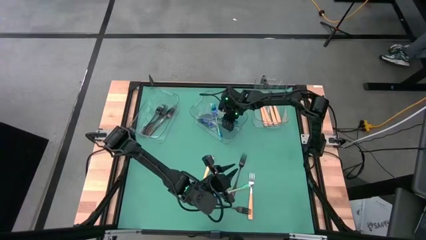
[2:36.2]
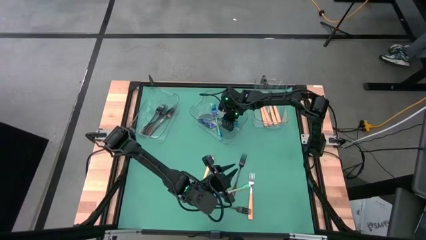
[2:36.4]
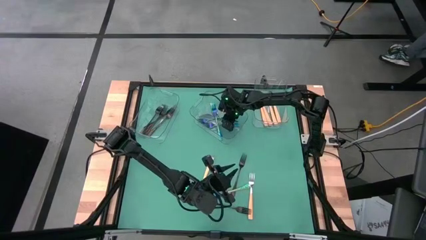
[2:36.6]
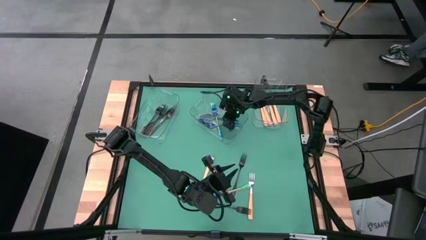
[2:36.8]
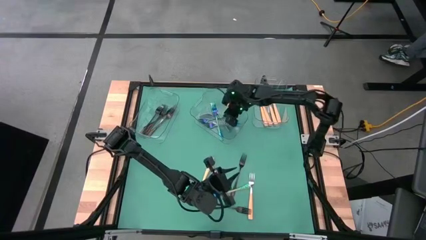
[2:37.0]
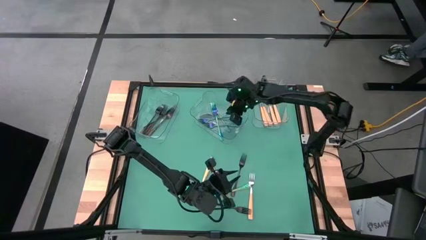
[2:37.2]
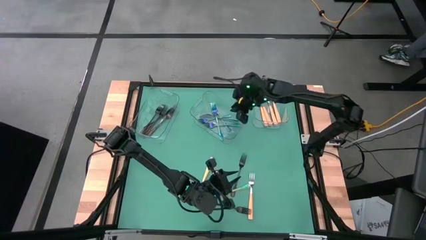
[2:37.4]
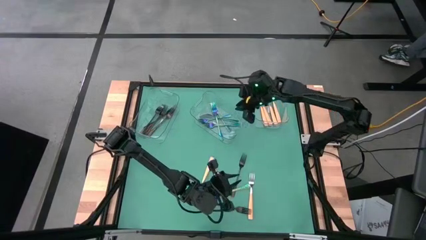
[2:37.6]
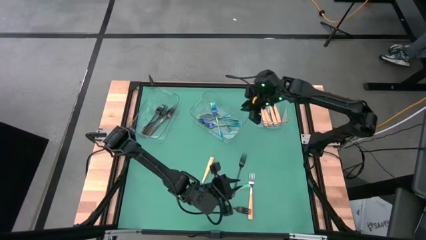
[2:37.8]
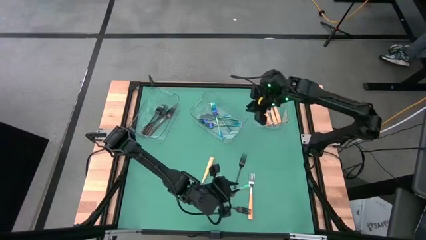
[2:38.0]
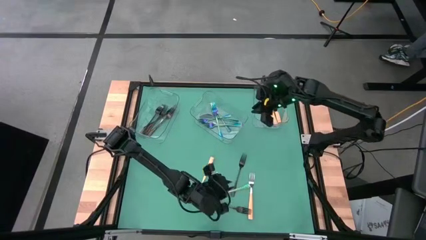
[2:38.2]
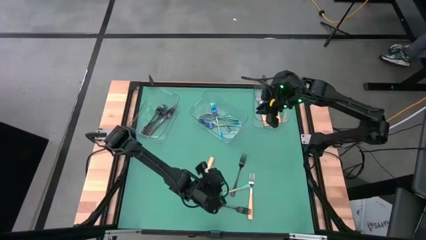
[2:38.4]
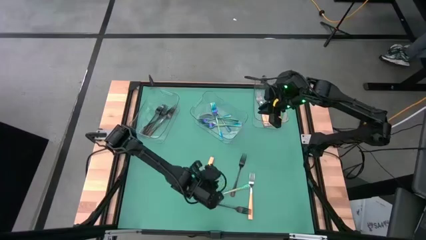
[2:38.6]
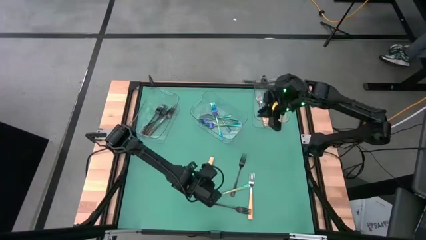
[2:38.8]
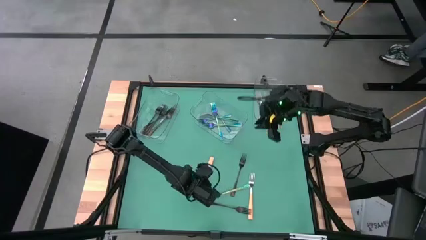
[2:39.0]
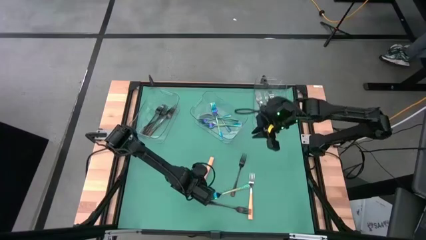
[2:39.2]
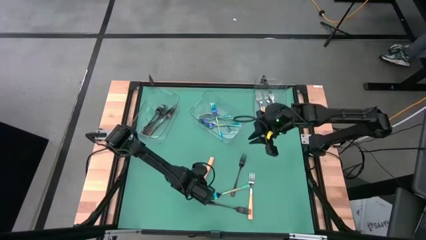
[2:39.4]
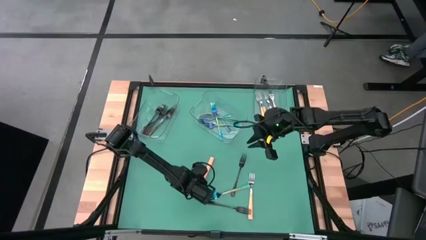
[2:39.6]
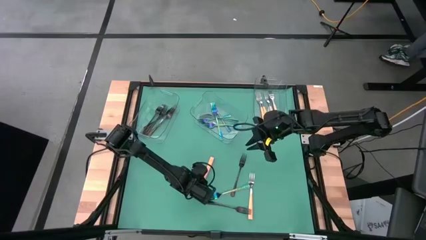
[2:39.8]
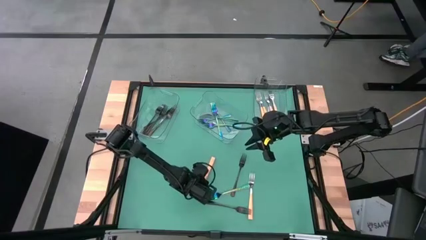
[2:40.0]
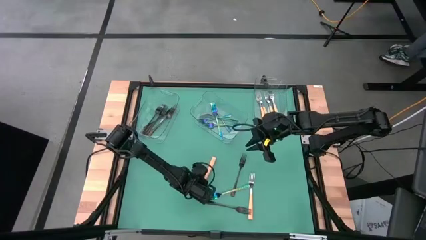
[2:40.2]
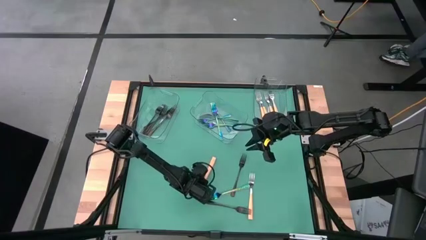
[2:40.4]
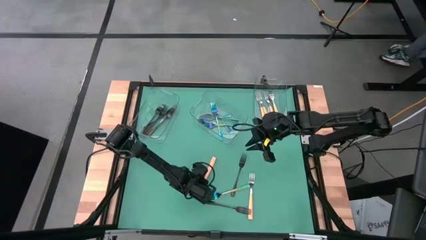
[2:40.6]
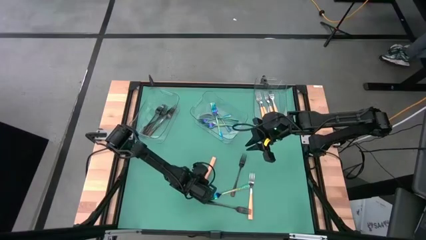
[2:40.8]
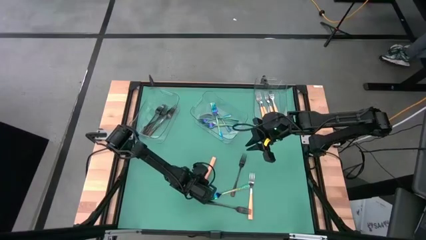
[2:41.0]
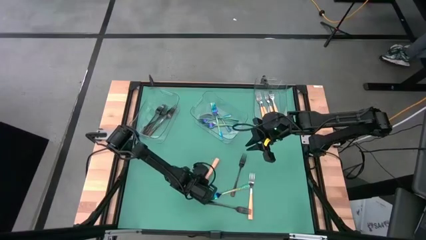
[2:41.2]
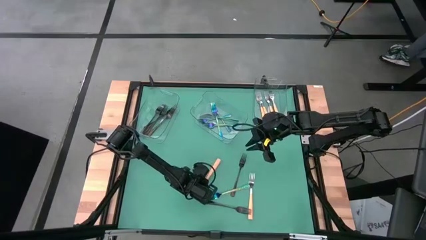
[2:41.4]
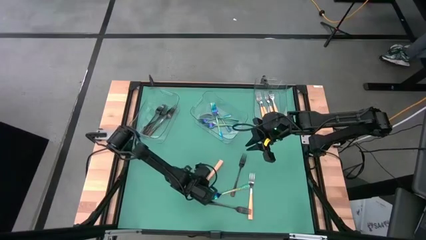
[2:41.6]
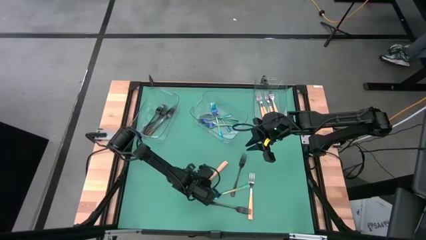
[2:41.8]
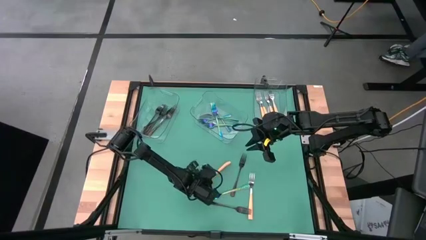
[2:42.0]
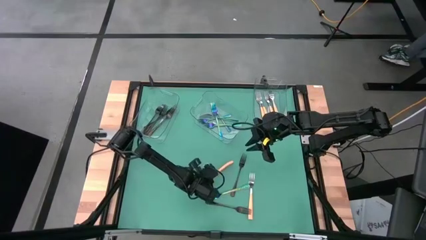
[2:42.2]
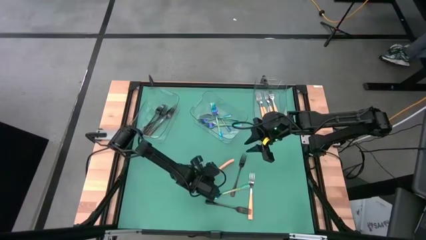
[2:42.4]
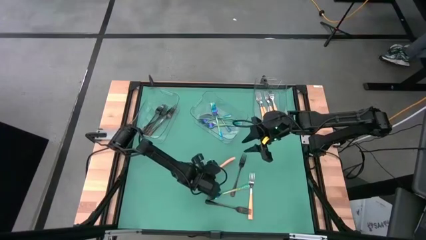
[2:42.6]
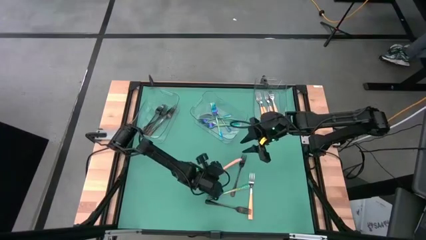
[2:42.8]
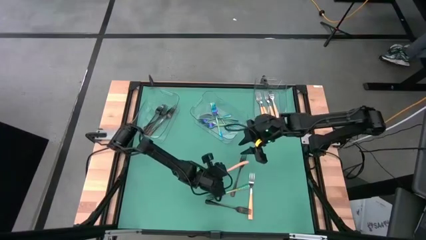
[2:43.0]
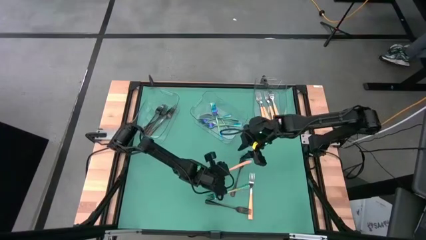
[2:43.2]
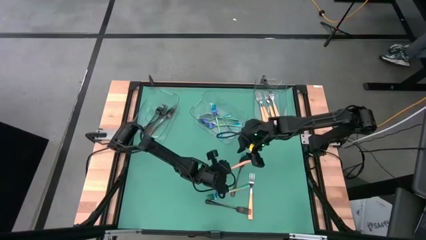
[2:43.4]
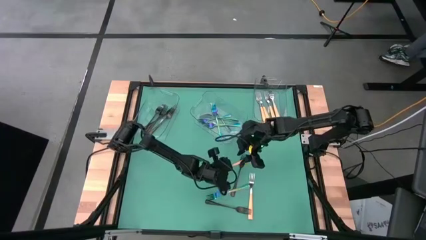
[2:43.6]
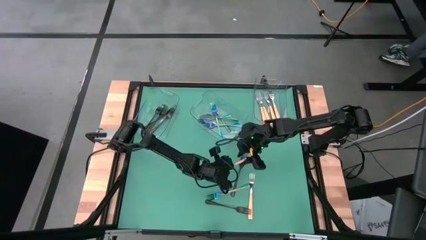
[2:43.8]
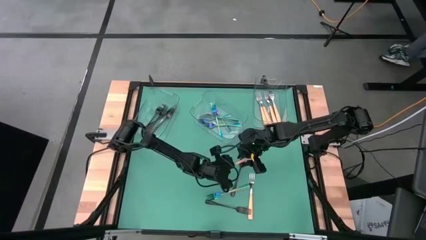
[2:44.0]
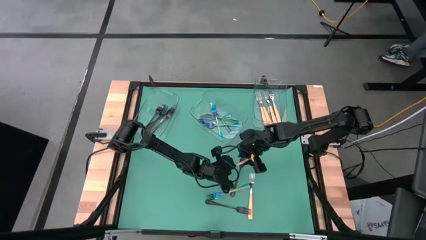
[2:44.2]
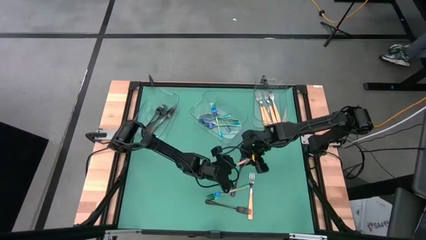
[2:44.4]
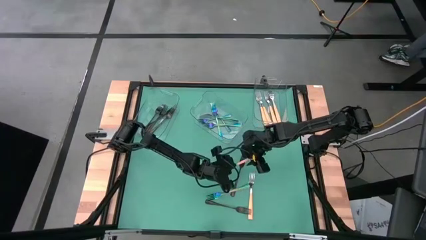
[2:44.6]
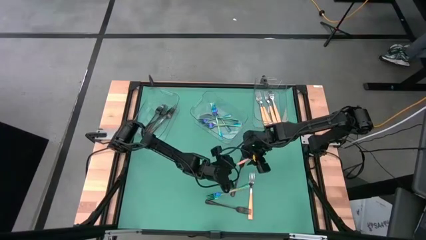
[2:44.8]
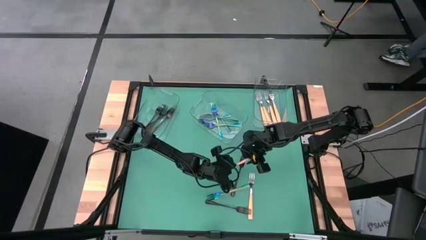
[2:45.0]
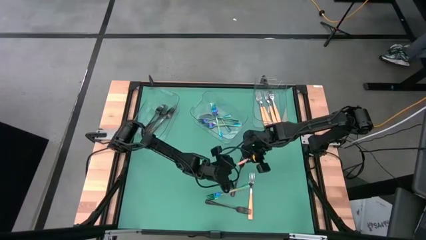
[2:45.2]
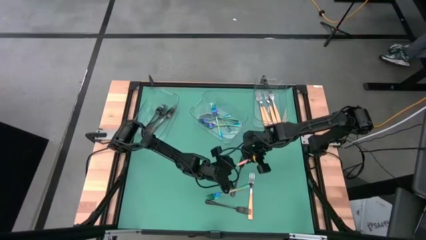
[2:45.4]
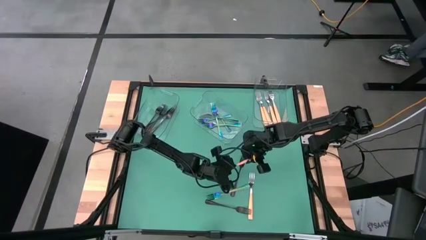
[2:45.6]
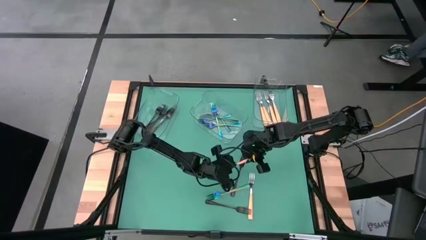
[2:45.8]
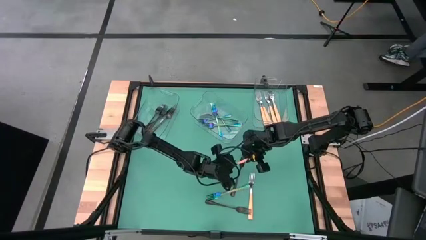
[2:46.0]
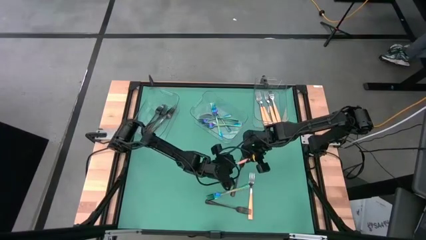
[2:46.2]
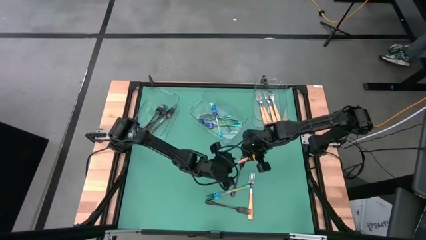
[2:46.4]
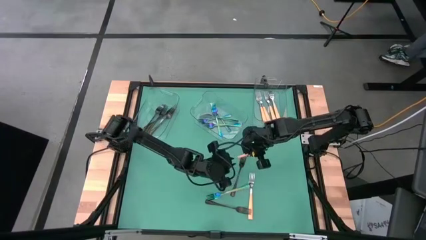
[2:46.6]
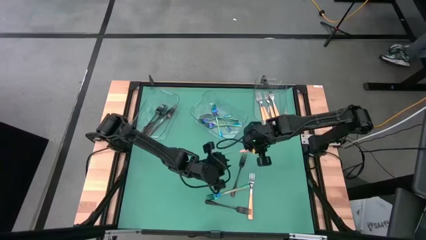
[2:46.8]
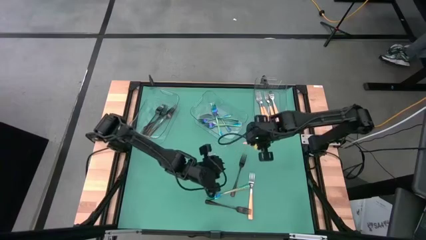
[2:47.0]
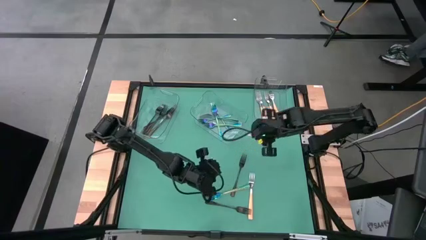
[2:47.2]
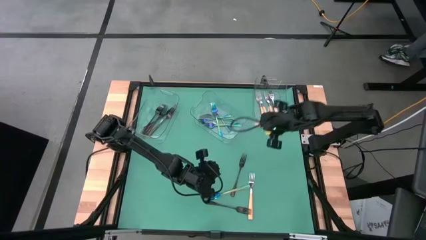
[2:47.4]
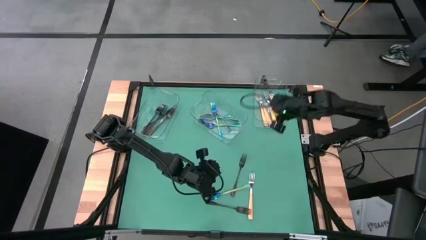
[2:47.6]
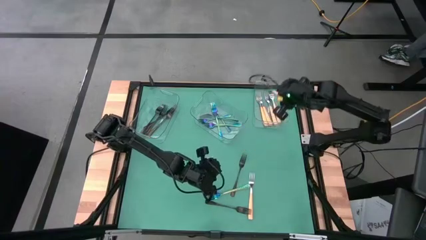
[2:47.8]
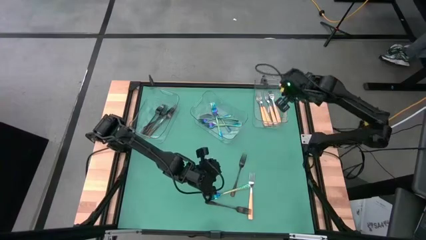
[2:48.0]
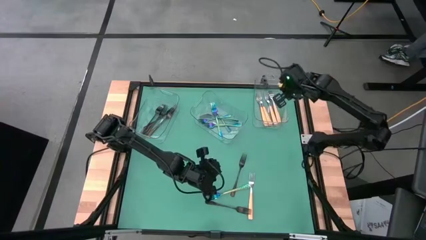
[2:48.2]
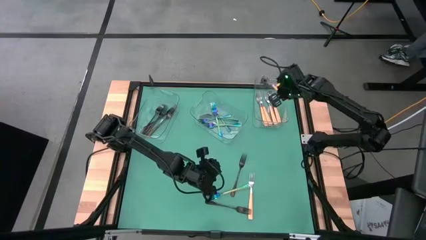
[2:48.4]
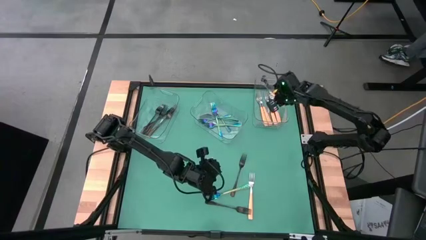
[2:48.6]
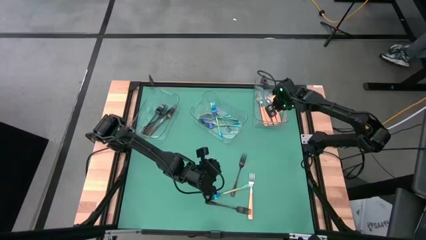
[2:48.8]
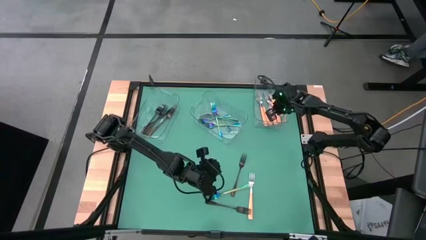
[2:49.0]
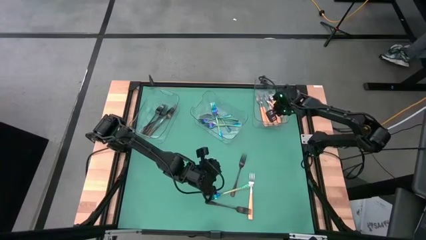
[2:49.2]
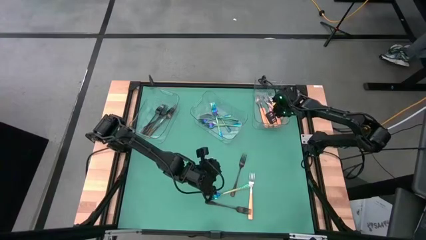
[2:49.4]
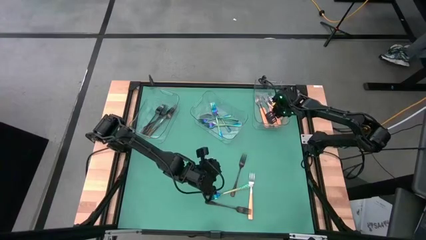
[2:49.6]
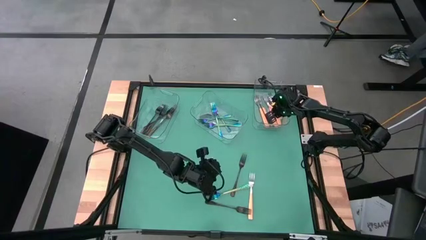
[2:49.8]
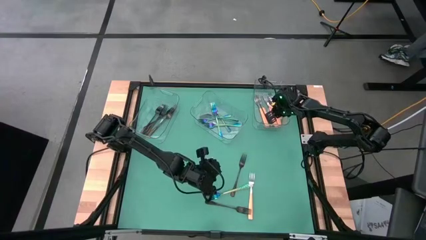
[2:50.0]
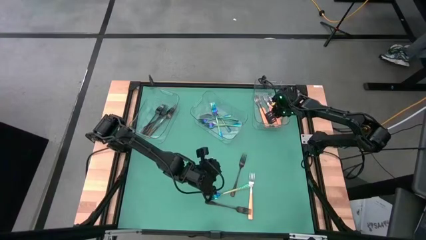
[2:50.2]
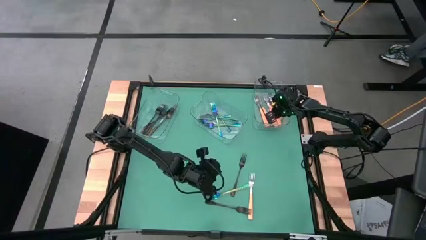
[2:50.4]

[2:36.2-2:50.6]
Task: Sort silverware by color (type)
Put the orange fork into the right transparent bin

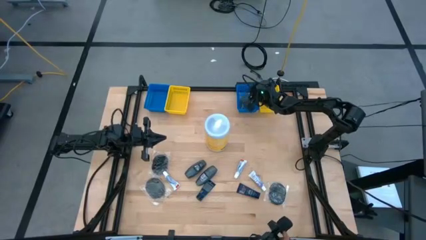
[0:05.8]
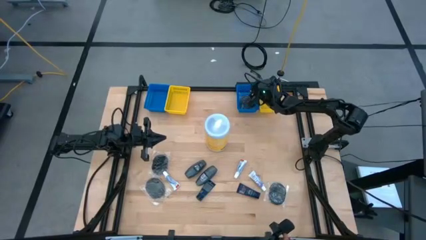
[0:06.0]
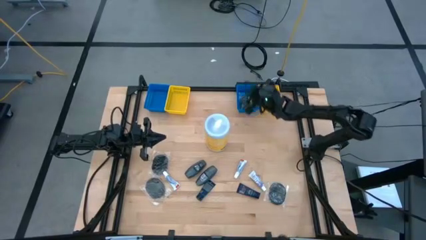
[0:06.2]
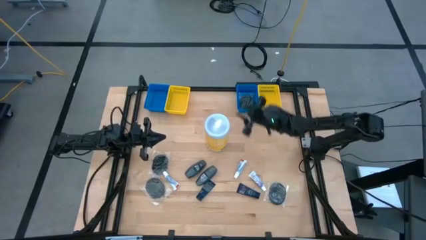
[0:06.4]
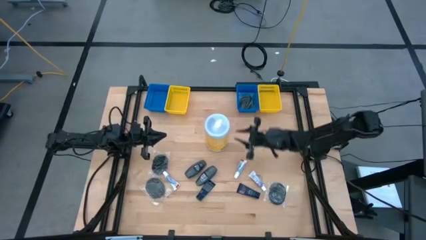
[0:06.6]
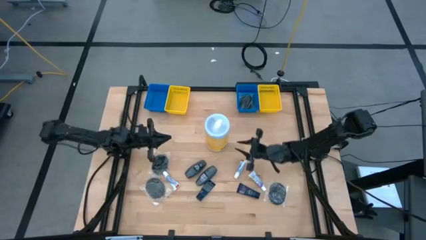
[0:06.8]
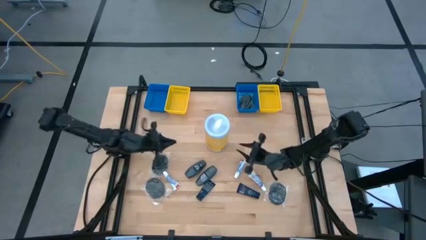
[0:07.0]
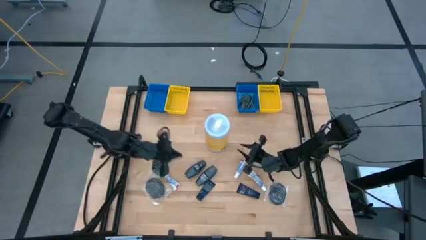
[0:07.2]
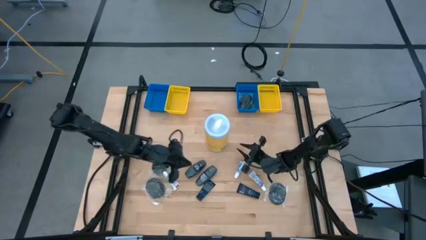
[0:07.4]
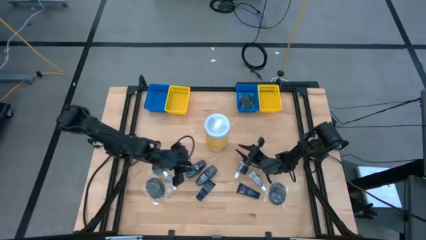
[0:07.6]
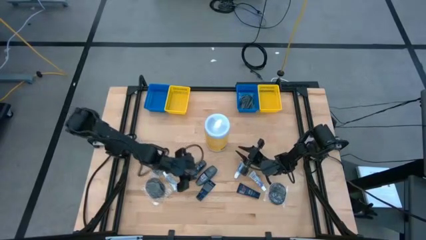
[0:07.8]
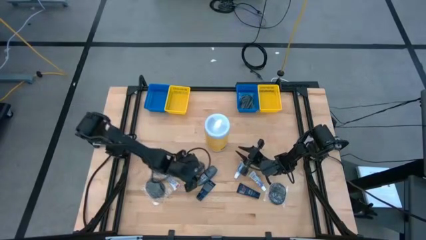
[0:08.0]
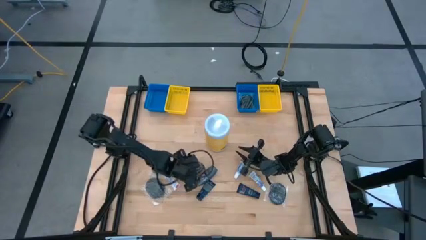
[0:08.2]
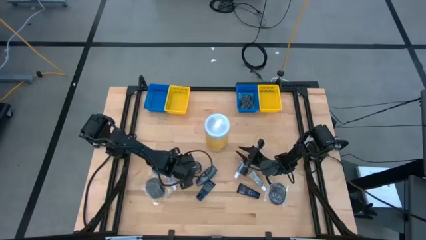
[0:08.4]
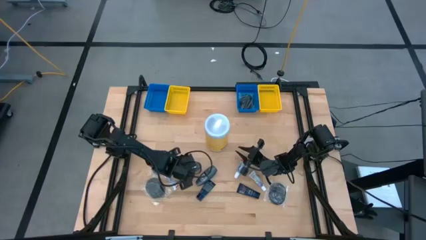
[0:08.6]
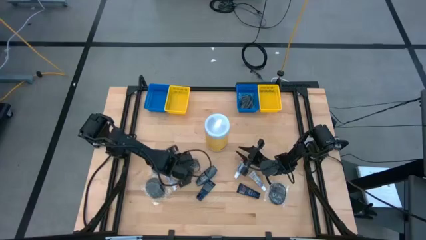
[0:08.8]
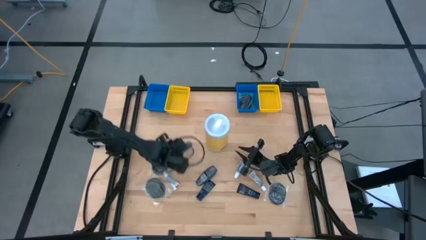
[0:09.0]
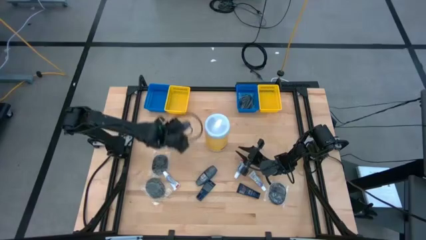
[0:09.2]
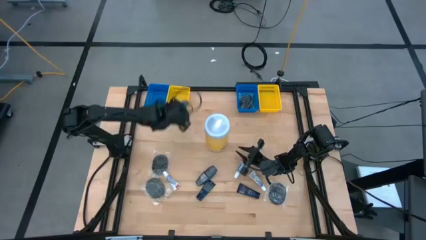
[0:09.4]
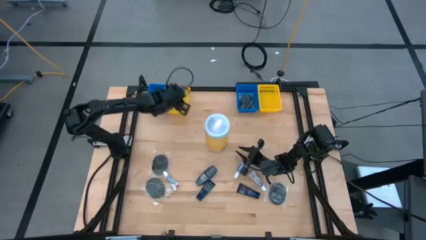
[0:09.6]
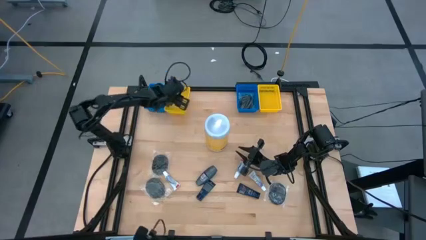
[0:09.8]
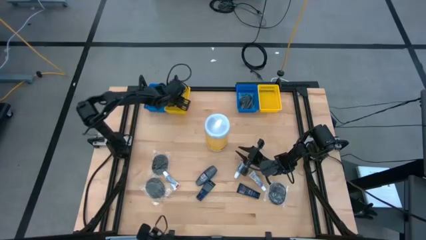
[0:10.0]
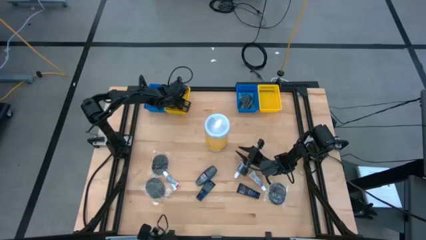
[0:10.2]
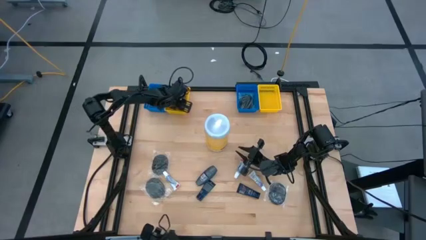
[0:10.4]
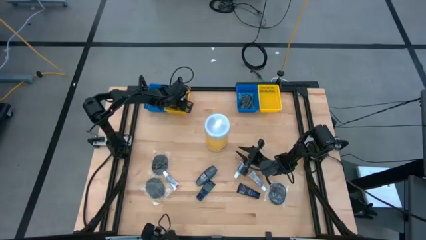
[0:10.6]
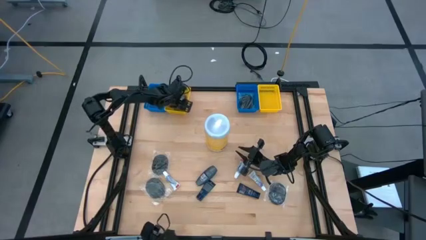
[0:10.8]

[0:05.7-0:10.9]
Task: Pick & Place Travel size toiletries
Put the top deodorant into the left yellow bin
